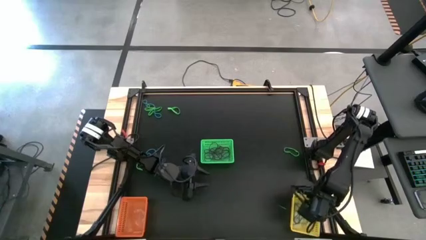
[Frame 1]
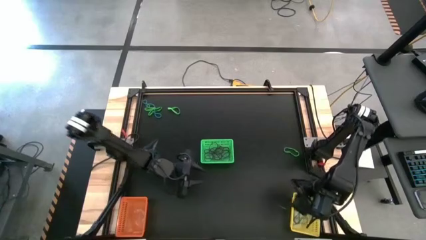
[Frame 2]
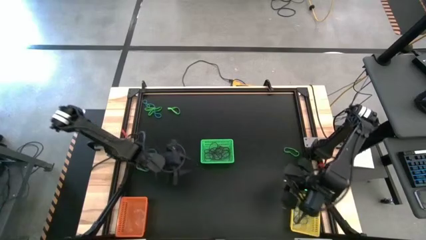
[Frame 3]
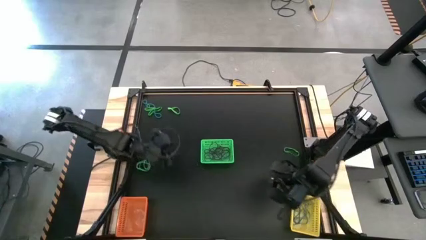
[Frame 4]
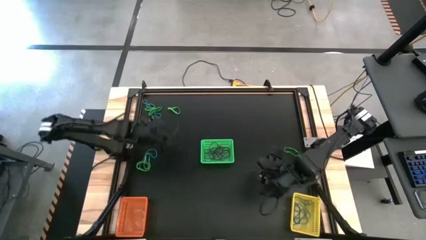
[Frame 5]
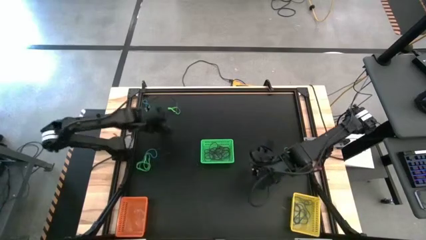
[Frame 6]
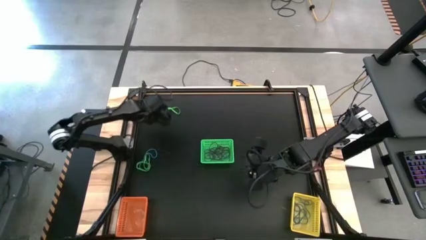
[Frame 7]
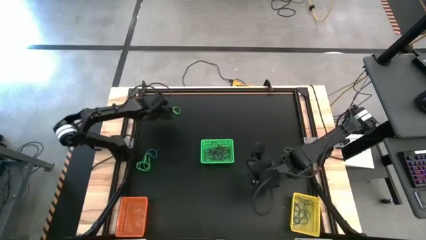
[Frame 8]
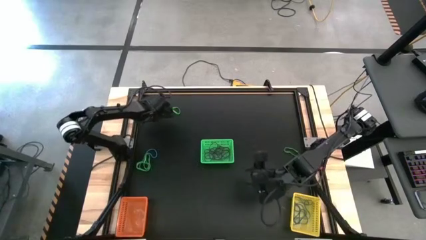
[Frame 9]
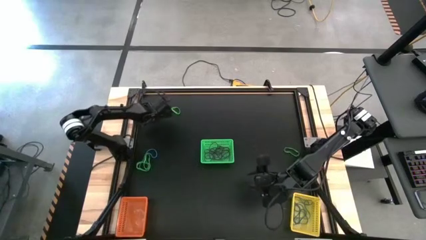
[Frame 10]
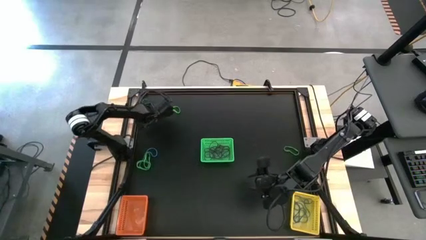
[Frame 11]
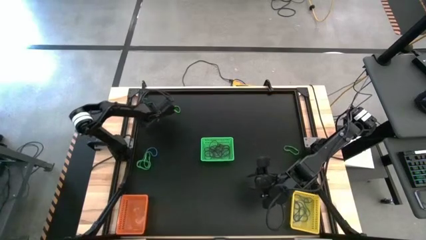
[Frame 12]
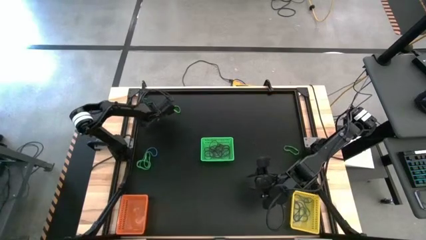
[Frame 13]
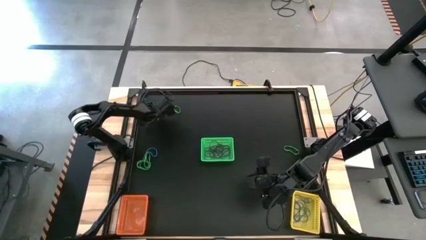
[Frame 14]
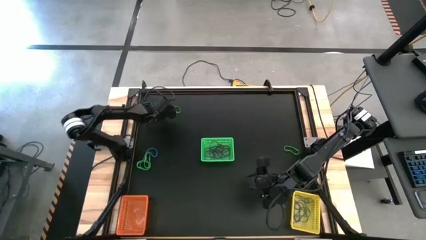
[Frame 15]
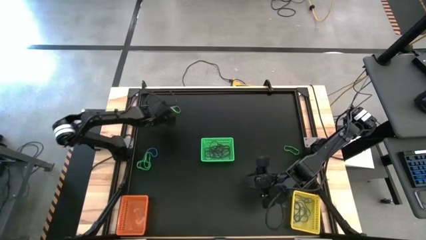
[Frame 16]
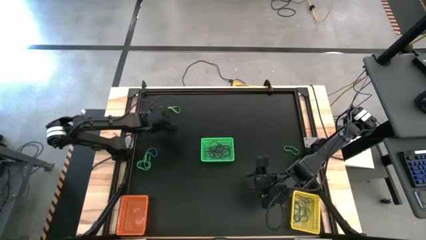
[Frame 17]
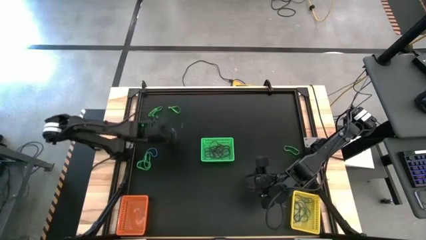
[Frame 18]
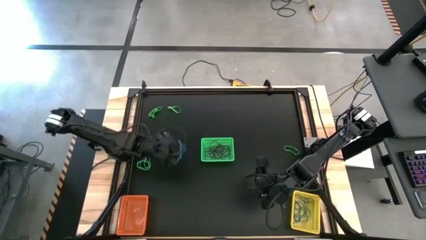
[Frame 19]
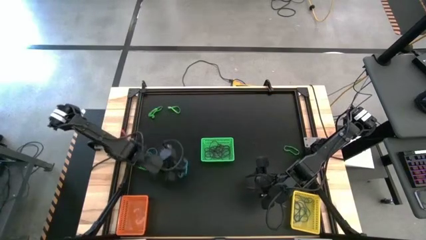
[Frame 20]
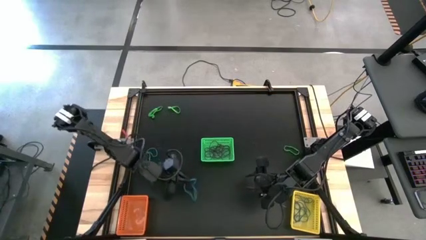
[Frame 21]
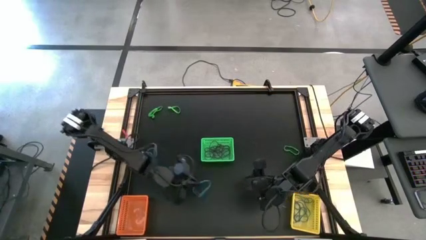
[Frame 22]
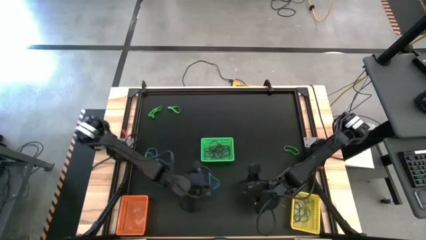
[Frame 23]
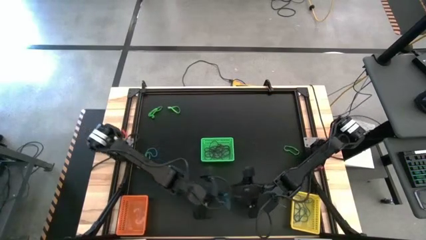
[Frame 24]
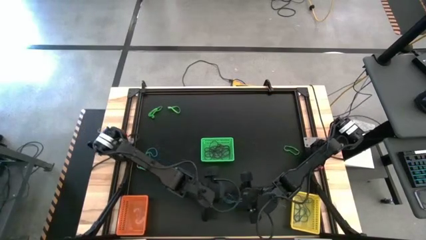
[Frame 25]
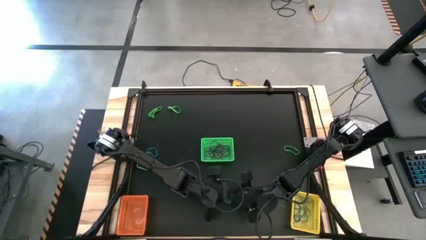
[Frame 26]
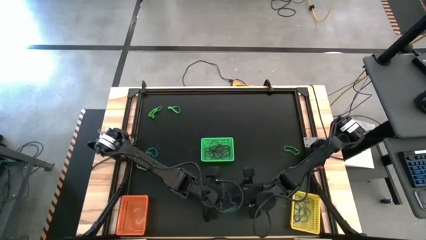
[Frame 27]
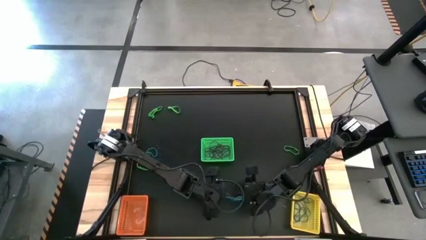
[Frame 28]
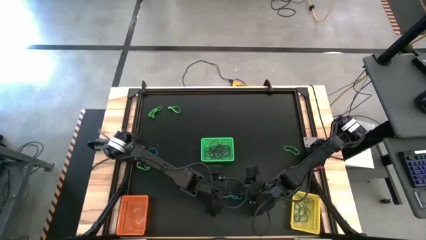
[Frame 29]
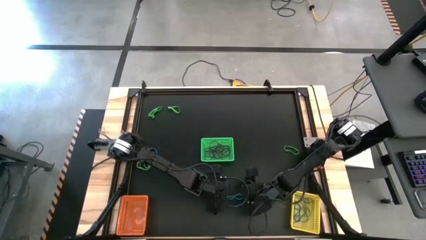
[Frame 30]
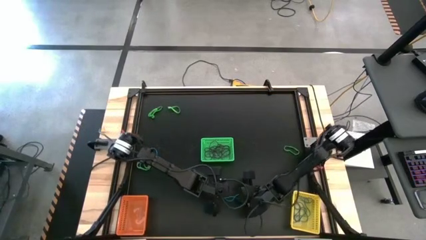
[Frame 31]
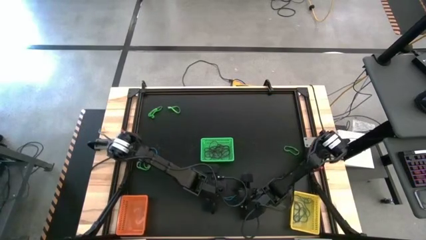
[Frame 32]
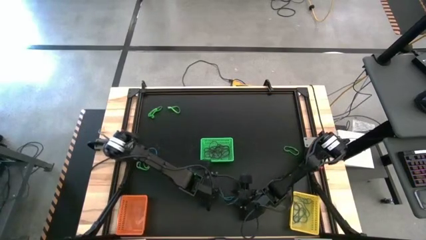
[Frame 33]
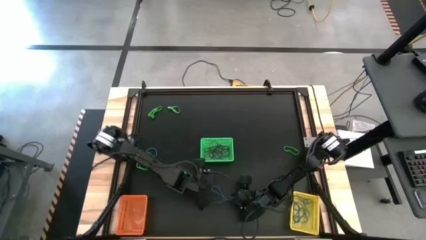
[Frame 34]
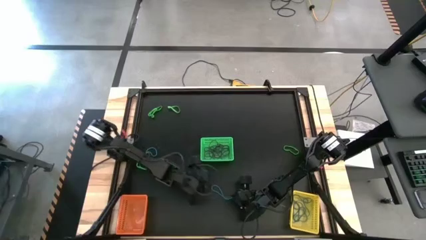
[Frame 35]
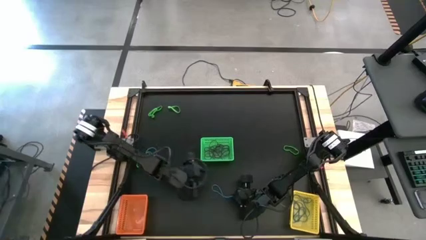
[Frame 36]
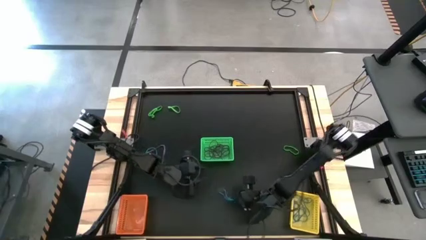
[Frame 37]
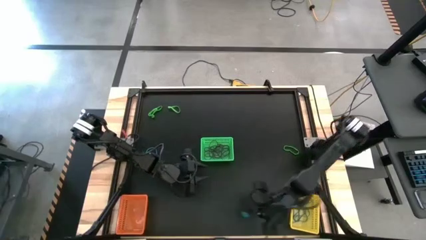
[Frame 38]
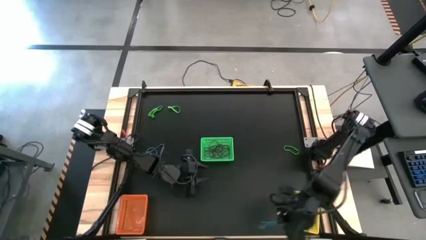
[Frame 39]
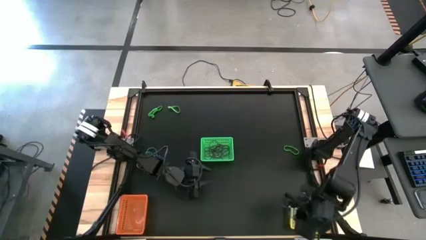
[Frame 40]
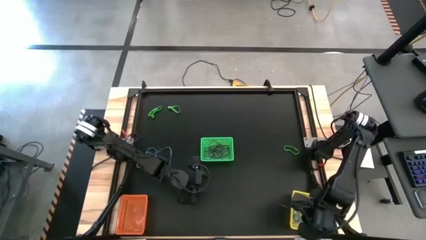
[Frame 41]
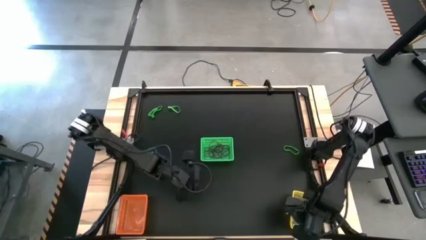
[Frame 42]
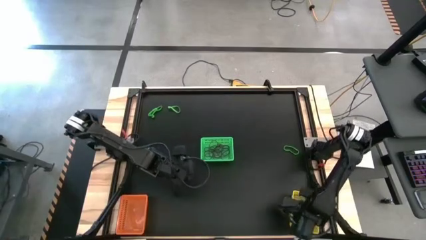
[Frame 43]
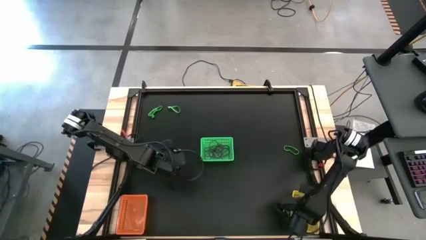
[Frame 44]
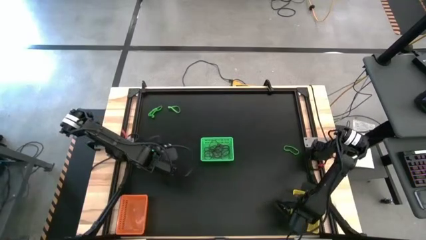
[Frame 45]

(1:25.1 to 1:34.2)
Task: Sort rubber bands into baskets
Put the blue rubber band into the yellow basket

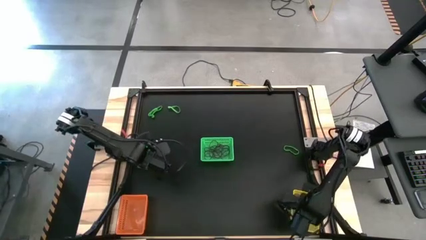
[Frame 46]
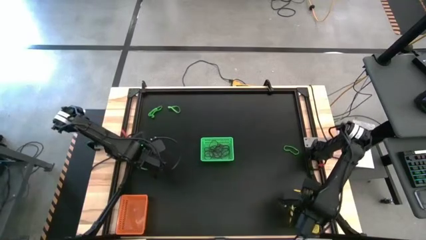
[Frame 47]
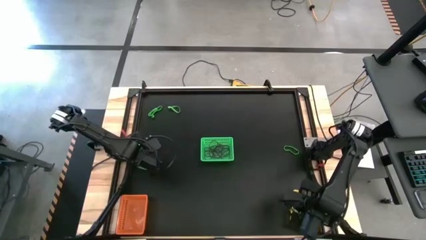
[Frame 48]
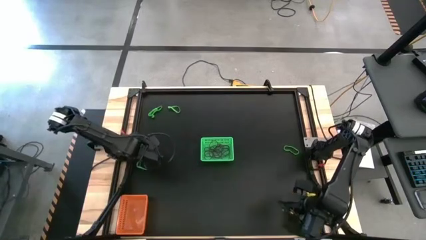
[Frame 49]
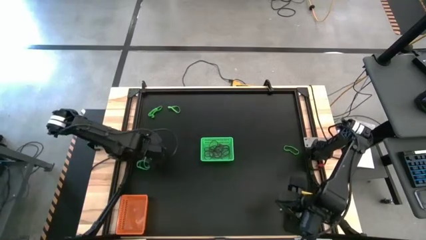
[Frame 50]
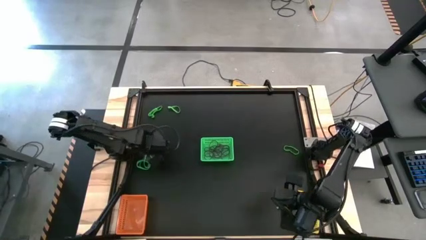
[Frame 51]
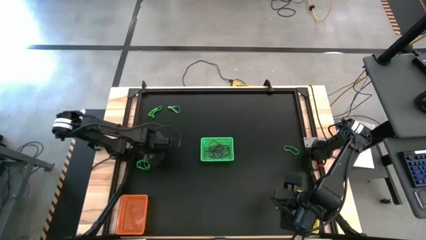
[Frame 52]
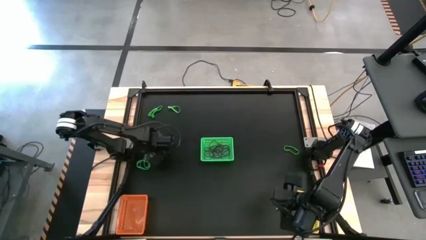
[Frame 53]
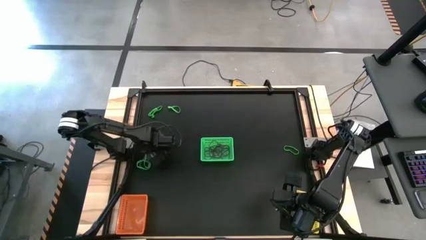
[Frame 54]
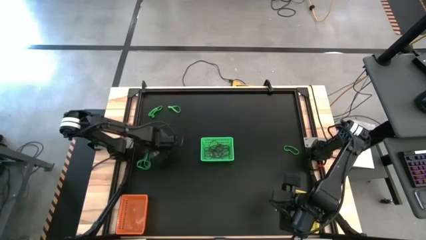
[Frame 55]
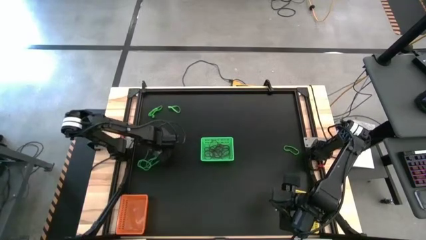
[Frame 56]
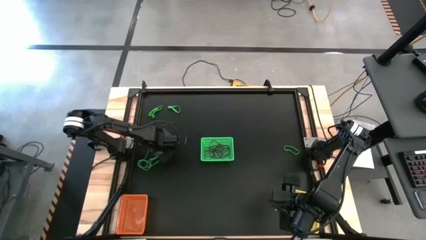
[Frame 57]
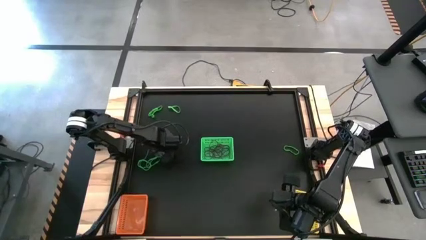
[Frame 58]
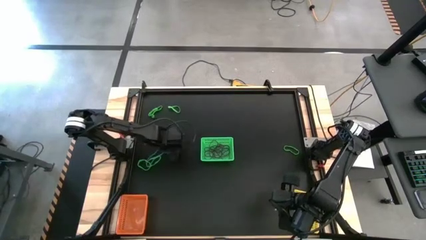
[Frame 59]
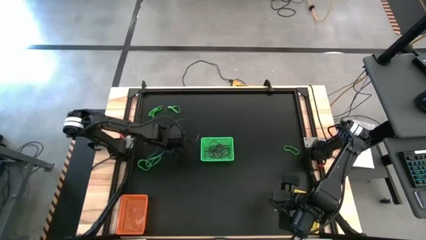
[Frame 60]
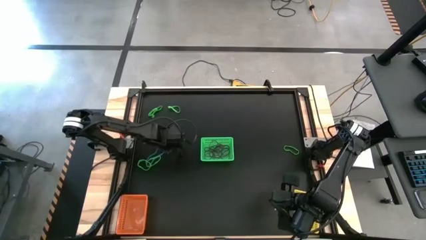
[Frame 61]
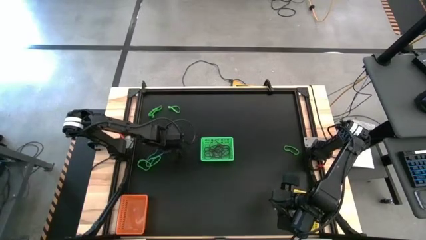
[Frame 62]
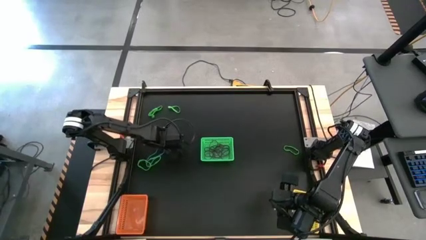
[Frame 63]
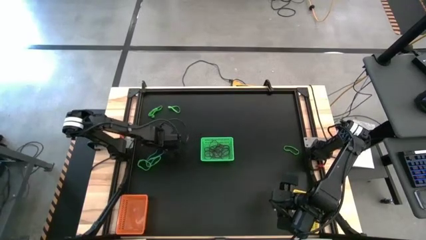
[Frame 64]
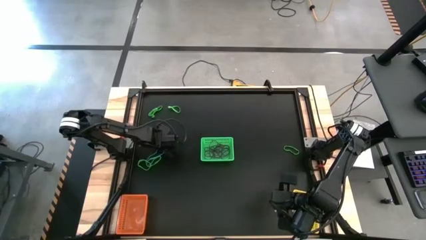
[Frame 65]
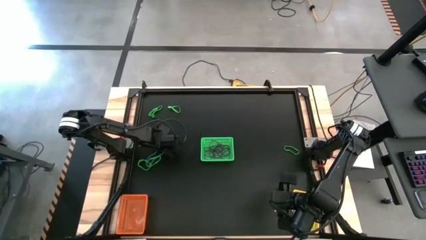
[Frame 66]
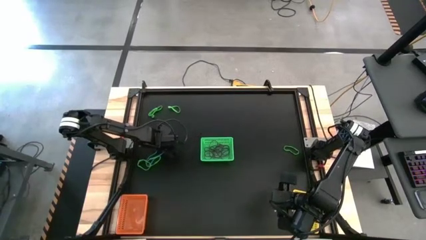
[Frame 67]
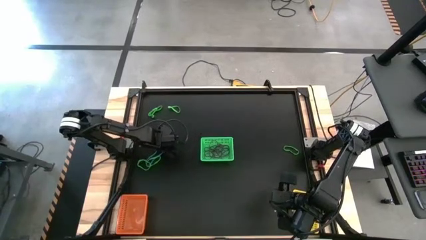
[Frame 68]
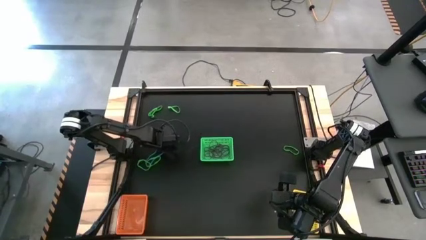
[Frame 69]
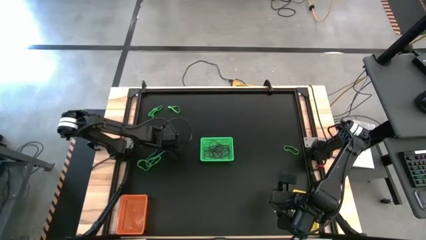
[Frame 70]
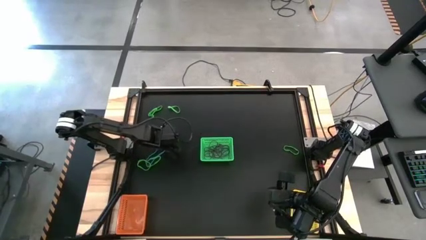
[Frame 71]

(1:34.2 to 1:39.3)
Put the blue rubber band into the yellow basket

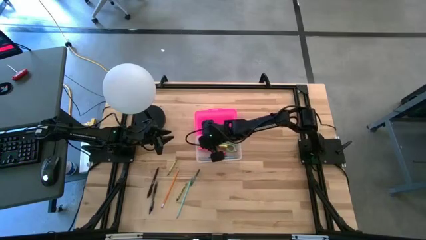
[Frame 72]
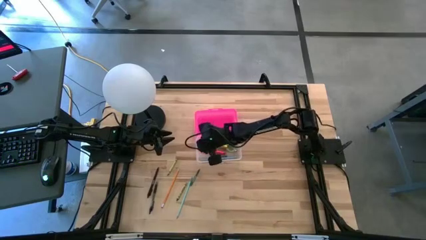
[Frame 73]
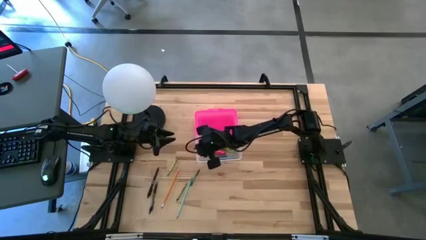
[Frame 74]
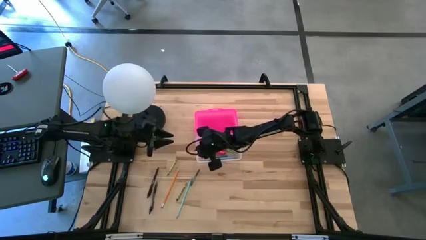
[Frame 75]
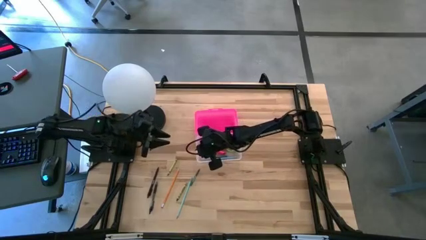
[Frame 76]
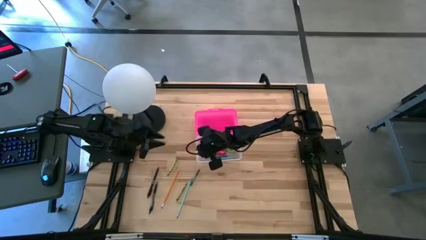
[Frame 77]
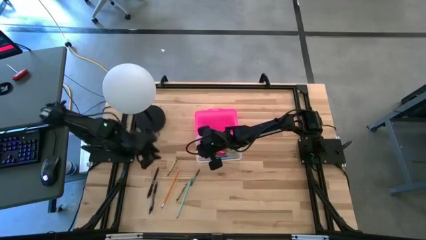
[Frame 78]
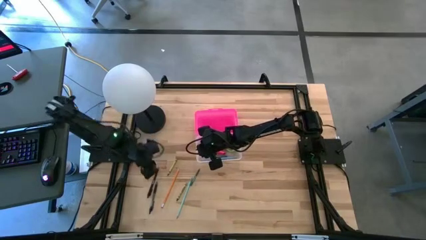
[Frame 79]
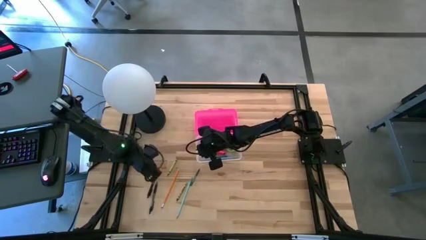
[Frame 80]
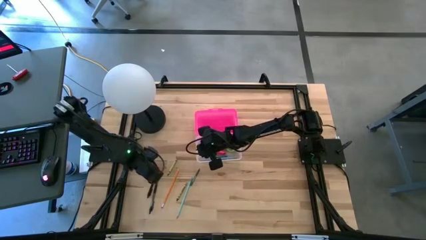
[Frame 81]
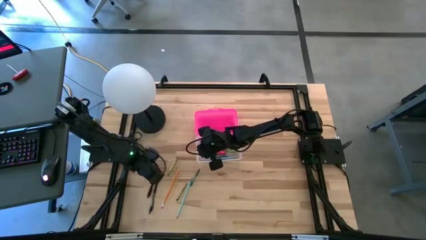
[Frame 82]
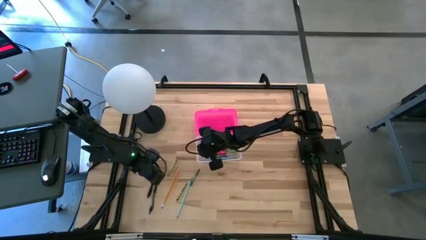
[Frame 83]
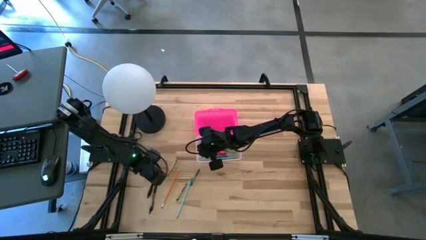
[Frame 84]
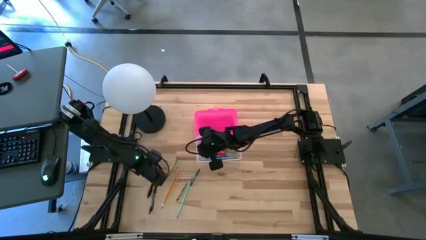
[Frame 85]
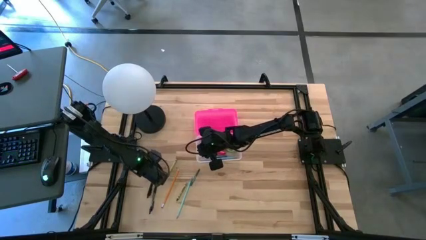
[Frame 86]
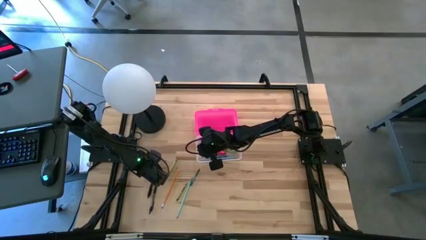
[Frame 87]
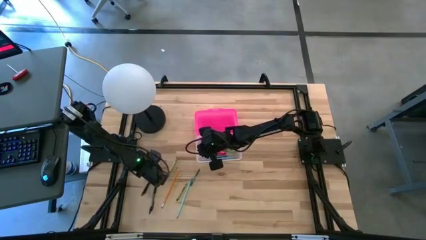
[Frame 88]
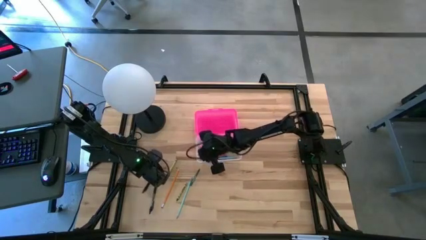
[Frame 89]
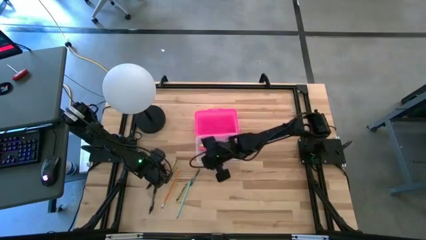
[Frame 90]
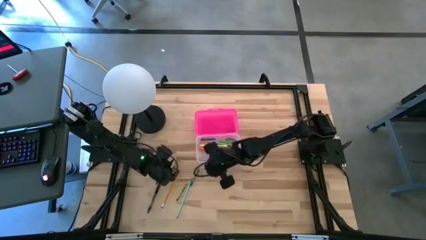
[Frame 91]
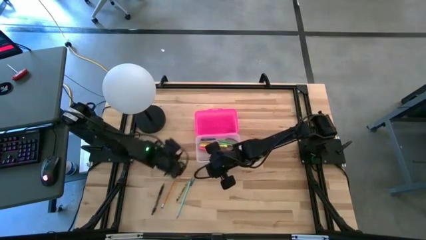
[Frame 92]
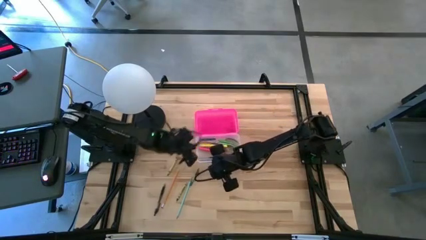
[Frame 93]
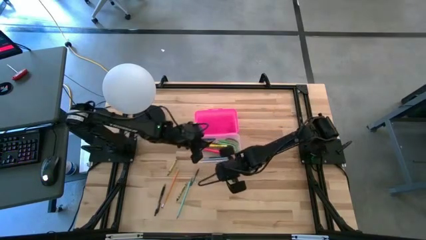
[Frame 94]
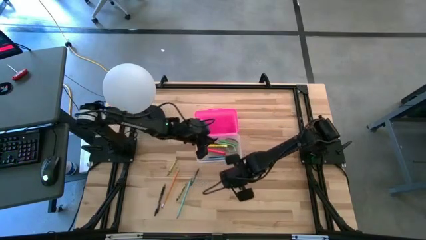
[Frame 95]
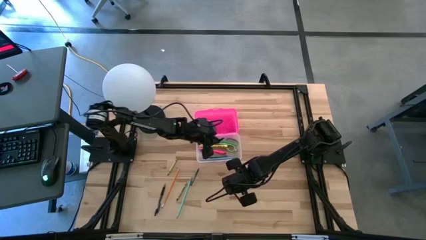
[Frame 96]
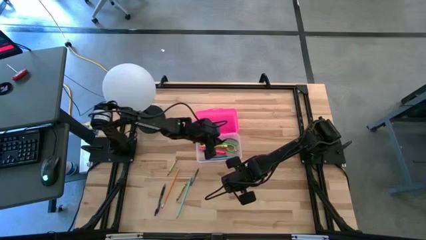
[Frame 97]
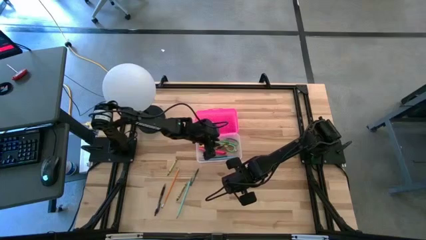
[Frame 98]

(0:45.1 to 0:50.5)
Task: Pick & place school supplies into a supply box
Put the top black pen into the pink supply box
